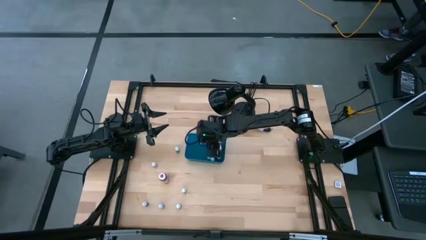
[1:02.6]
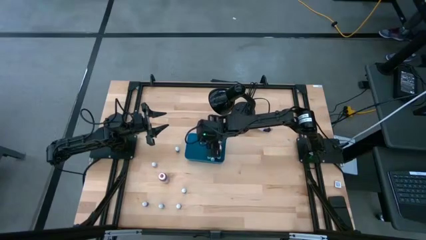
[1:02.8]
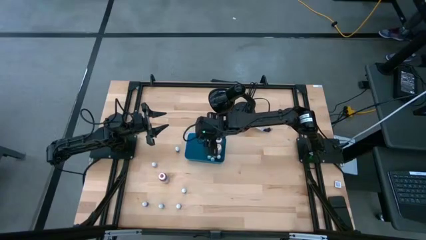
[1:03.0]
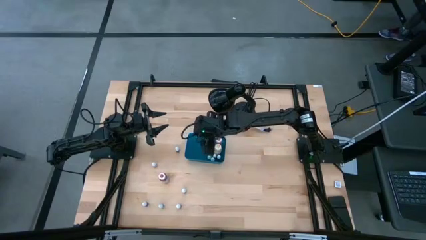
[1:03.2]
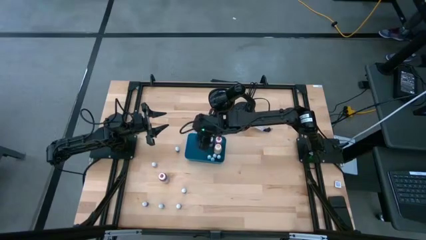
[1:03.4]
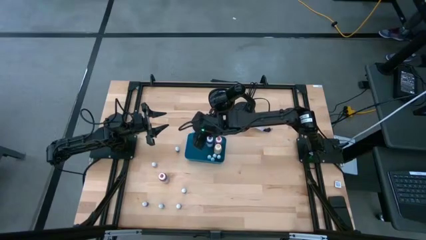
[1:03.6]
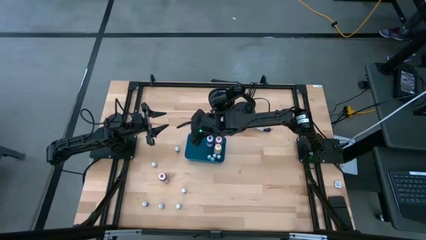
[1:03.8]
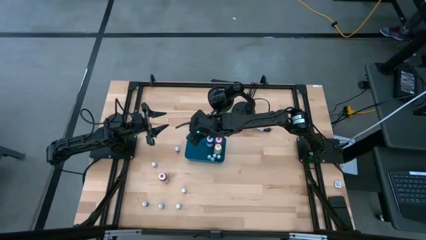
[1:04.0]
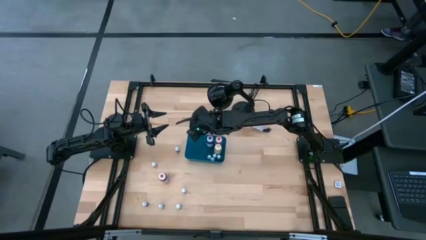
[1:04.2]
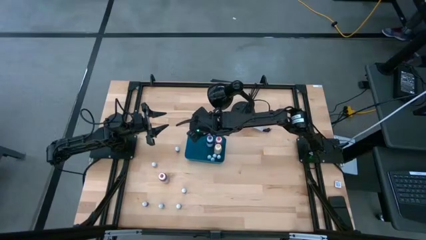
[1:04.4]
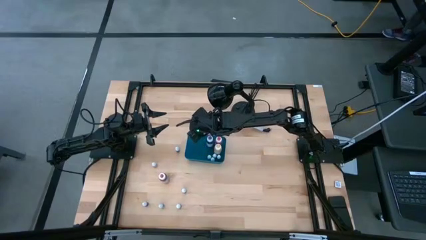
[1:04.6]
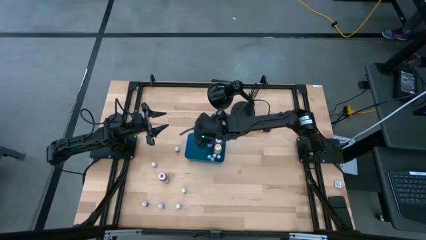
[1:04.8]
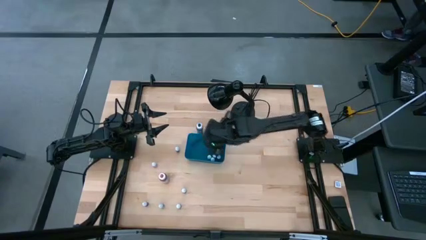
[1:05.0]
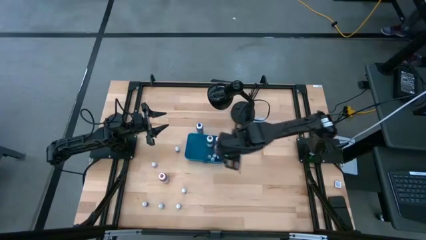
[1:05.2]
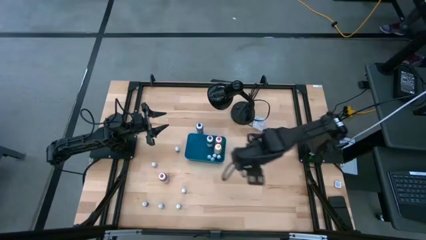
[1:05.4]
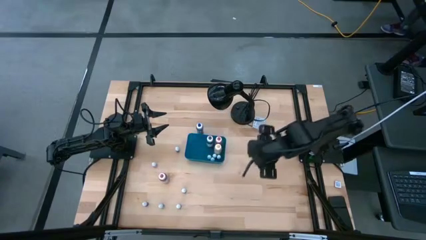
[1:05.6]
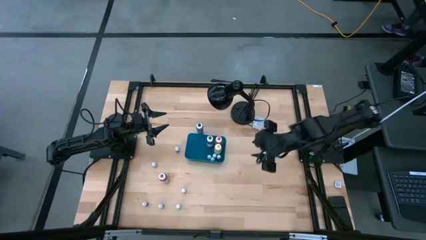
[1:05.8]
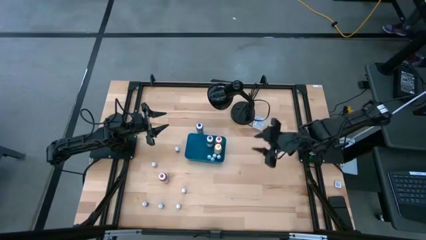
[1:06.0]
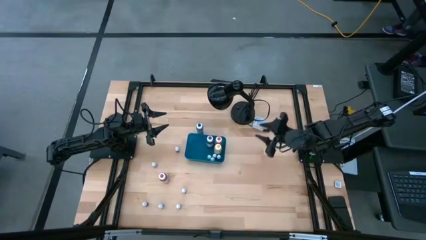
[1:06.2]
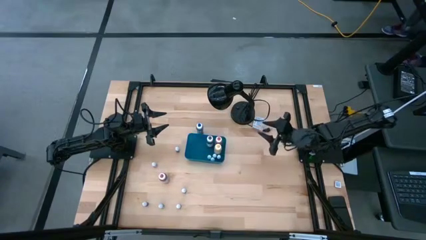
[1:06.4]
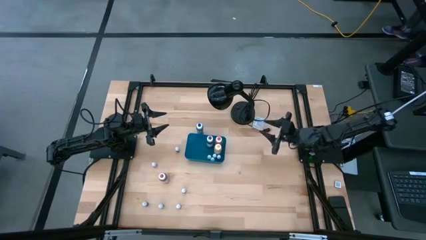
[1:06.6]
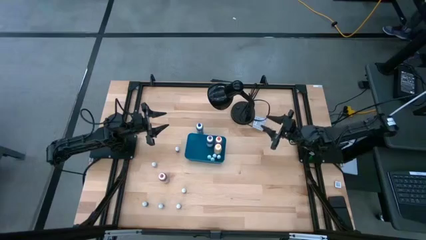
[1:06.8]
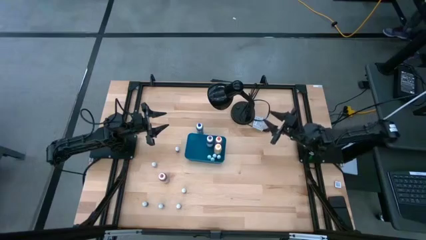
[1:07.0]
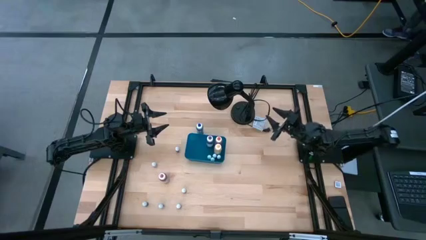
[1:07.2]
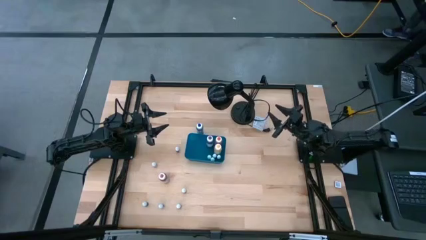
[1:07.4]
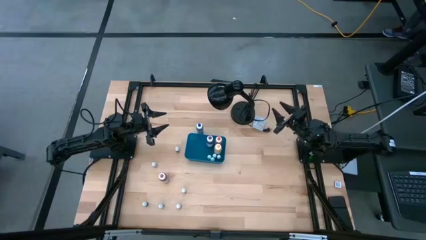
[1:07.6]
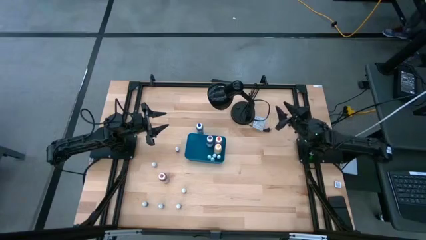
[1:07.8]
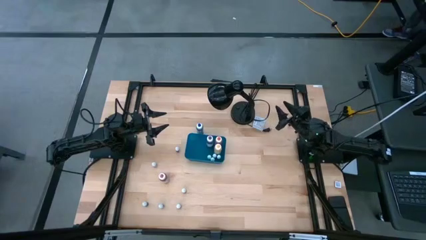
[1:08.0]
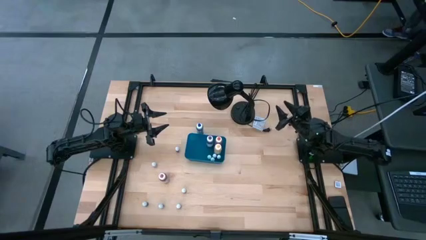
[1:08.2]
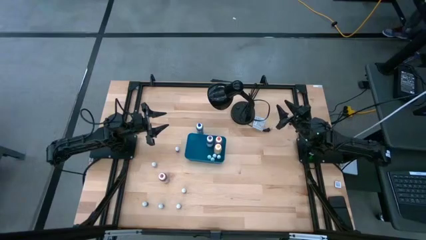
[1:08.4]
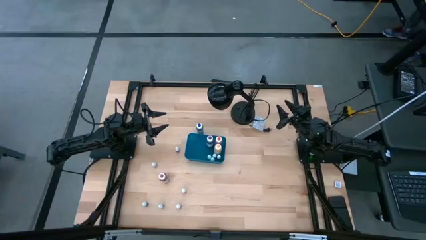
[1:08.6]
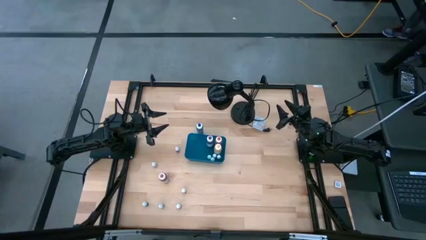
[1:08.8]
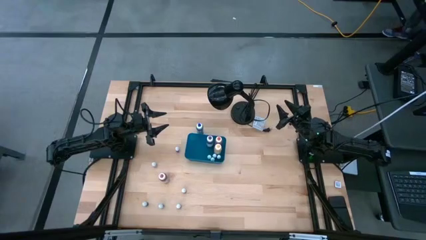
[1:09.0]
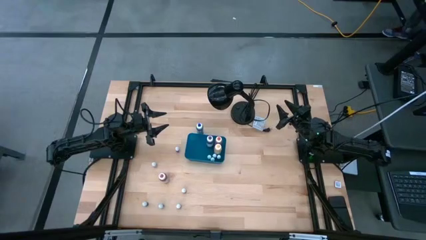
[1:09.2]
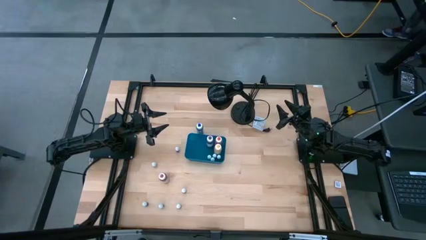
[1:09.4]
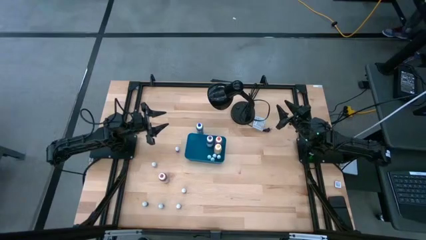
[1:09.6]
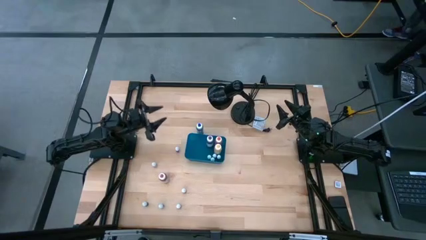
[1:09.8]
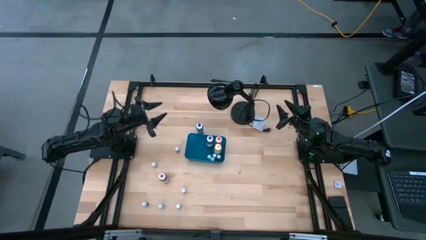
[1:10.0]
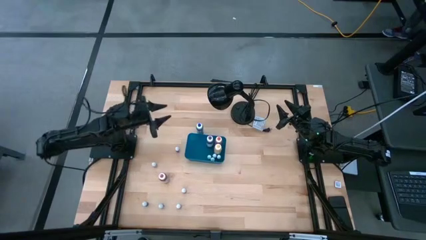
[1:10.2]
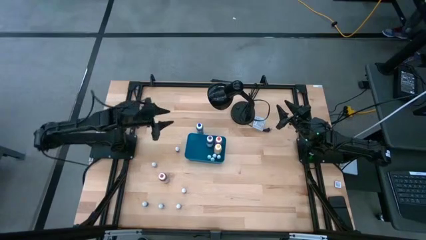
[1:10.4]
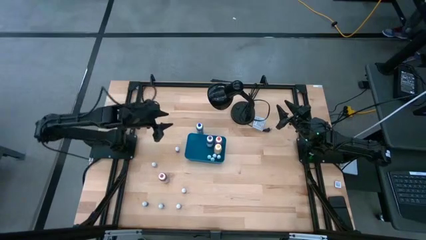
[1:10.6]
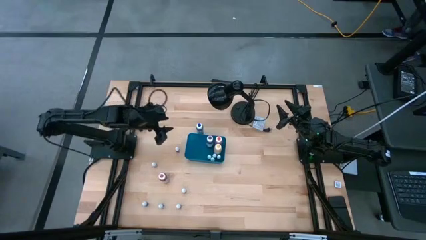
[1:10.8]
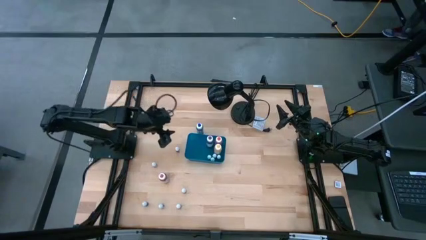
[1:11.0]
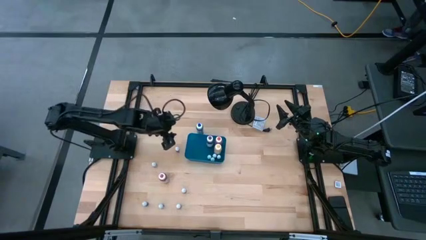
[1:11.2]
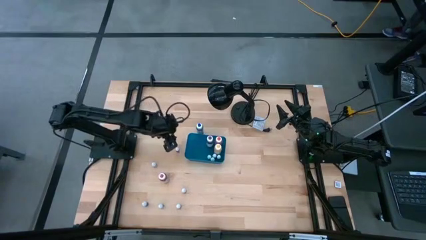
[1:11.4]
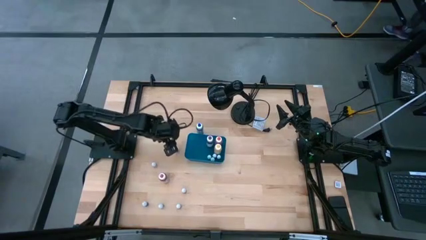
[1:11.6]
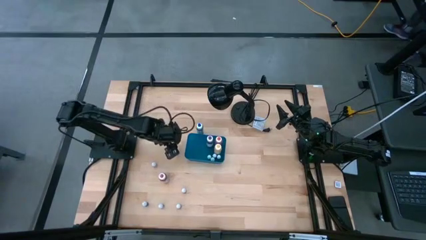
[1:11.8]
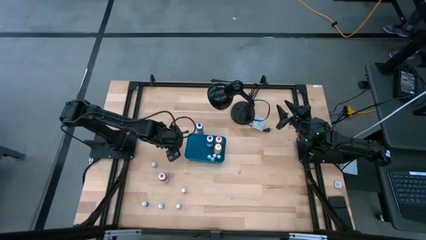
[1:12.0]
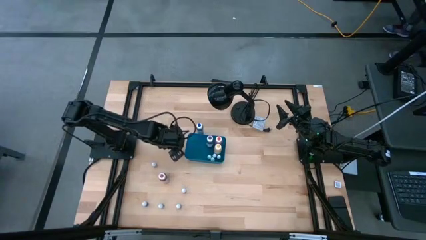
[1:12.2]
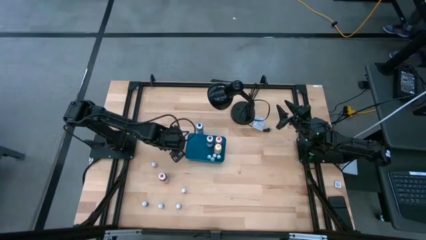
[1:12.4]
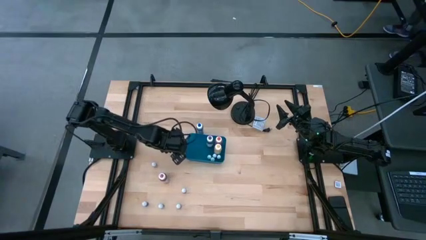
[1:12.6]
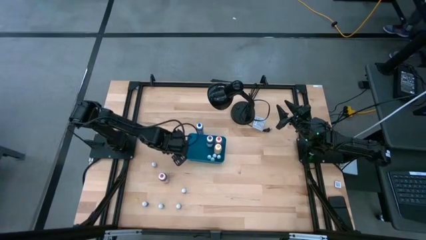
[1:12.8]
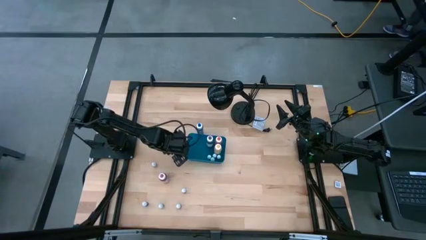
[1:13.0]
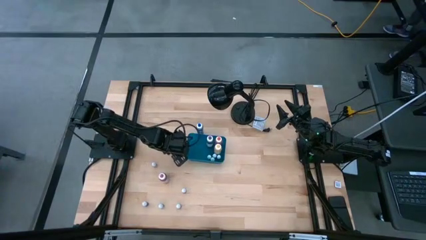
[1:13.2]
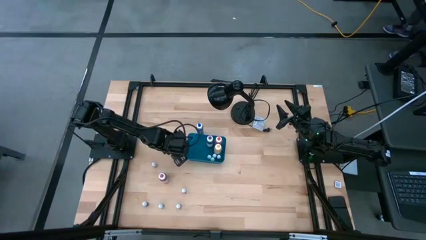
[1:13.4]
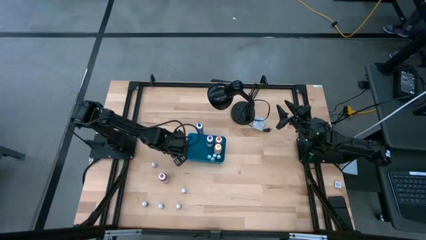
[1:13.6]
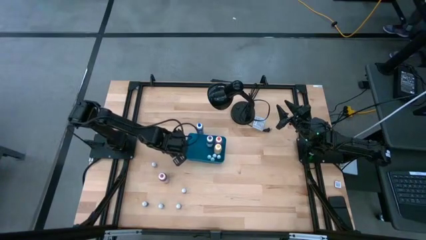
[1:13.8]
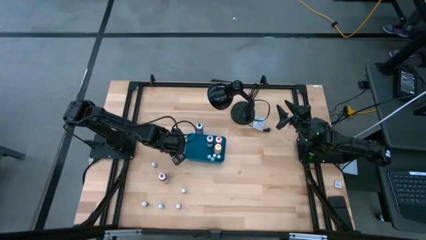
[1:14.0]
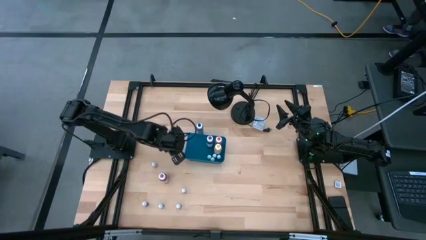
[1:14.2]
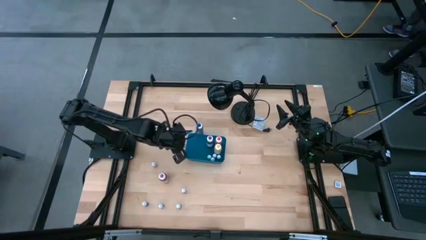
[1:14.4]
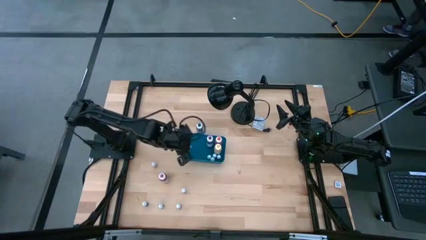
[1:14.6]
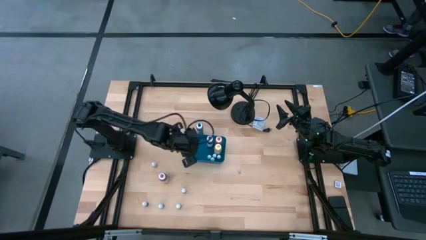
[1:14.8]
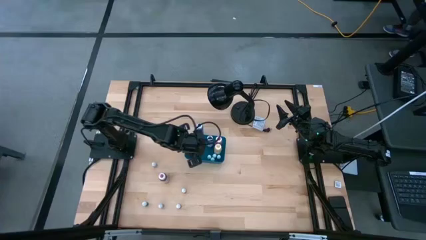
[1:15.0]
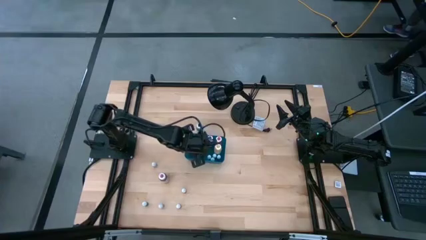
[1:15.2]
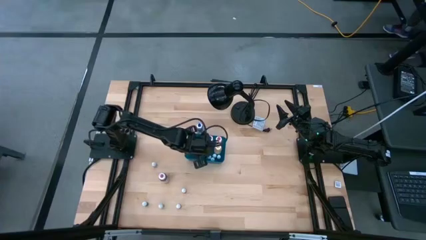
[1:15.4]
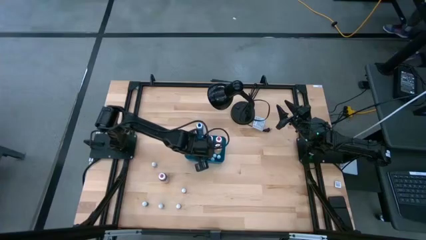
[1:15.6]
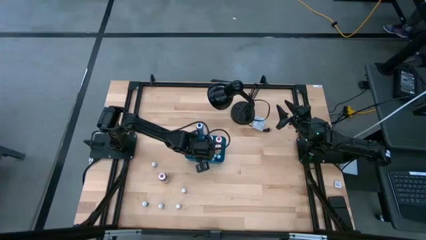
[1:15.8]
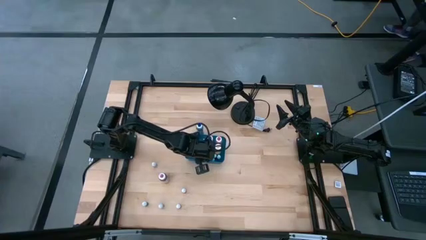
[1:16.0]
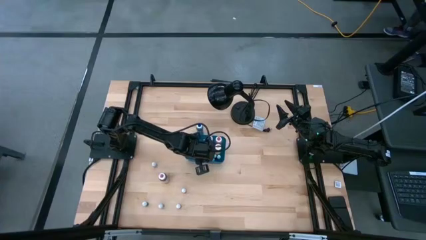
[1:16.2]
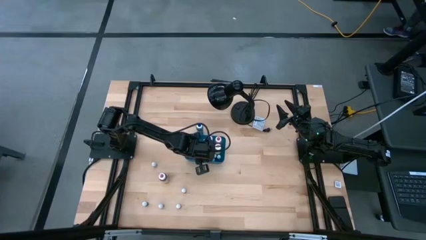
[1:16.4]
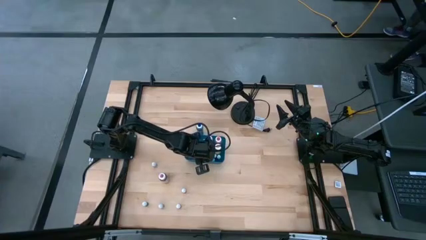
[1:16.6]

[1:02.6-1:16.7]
Task: Pick & Place food coloring
Put the small dark blue food coloring bottle into the blue bin

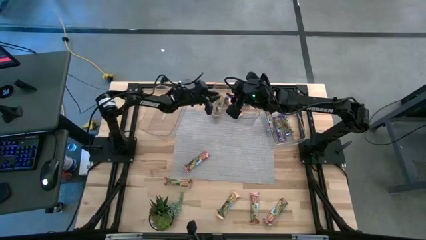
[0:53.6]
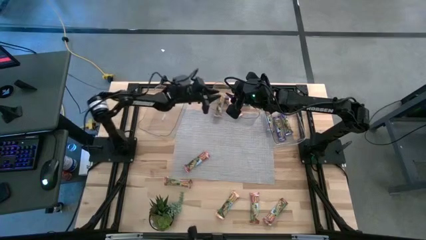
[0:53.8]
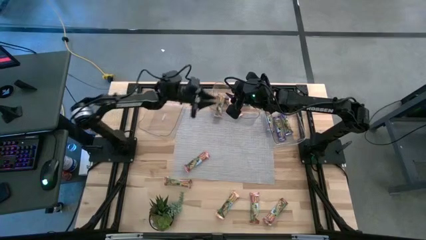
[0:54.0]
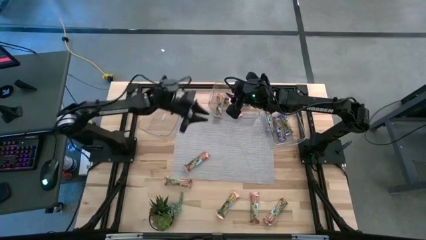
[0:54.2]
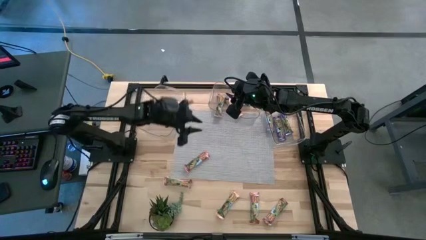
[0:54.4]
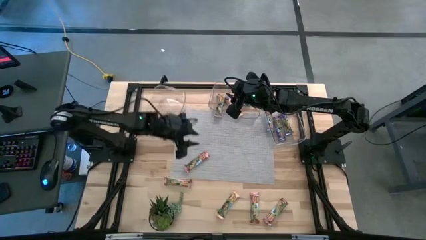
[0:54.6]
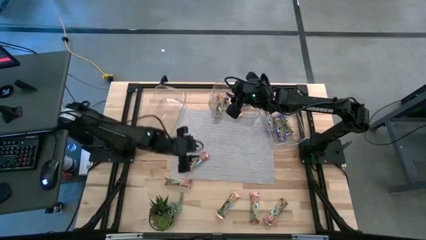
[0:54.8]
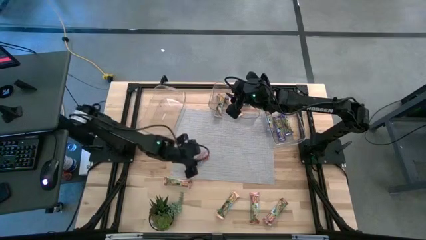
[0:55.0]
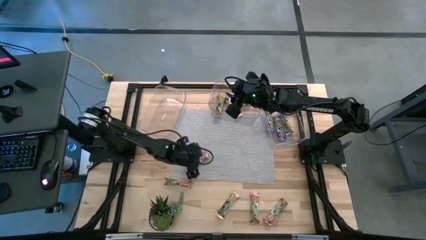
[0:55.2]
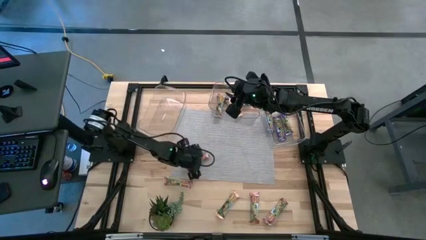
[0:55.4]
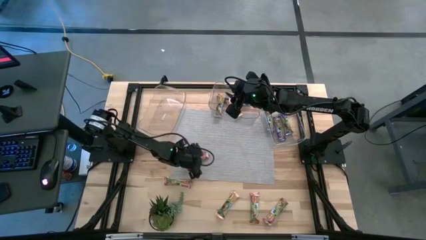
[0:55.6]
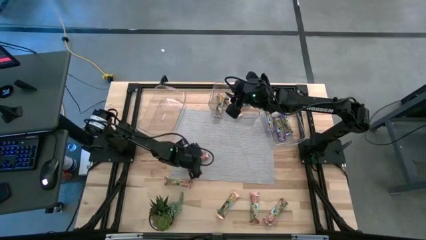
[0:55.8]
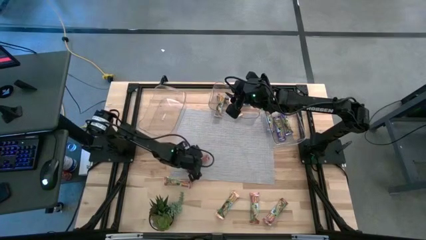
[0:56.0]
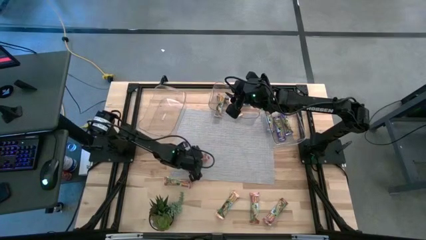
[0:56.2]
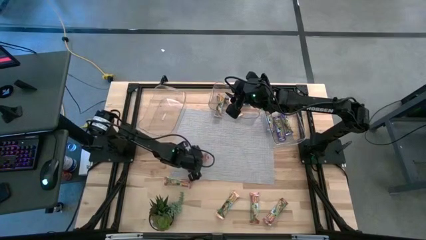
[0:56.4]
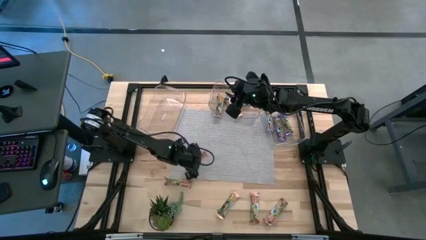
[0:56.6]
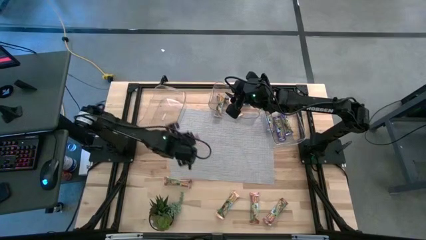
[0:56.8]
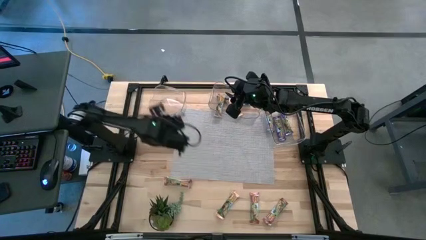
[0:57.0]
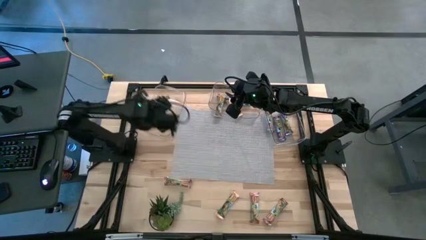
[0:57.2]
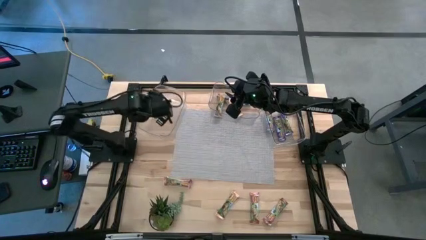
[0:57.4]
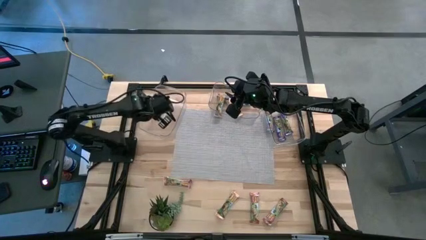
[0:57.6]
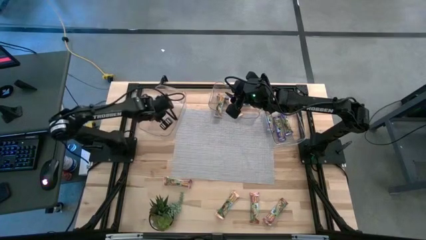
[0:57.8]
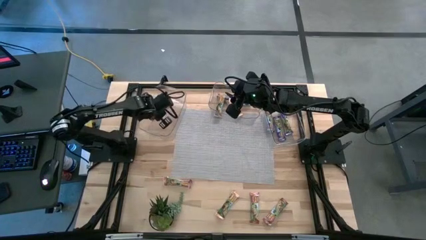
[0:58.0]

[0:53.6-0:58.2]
Task: Pick and place Granola Bars by type
Put the red granola bar into the left transparent bin
